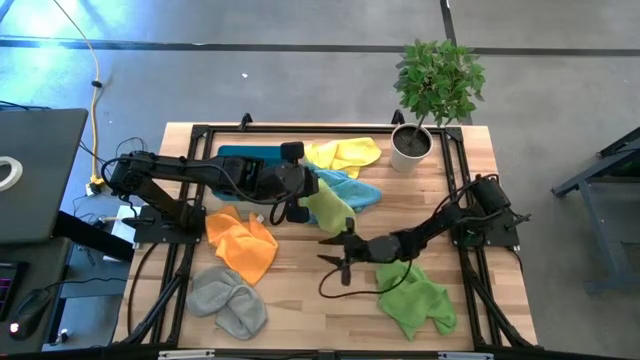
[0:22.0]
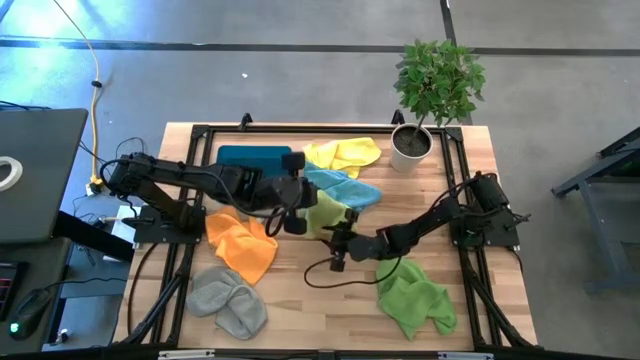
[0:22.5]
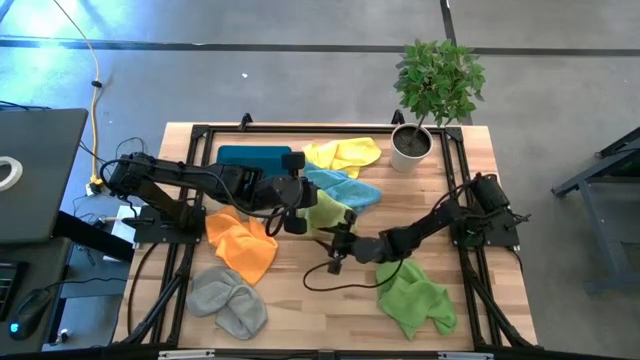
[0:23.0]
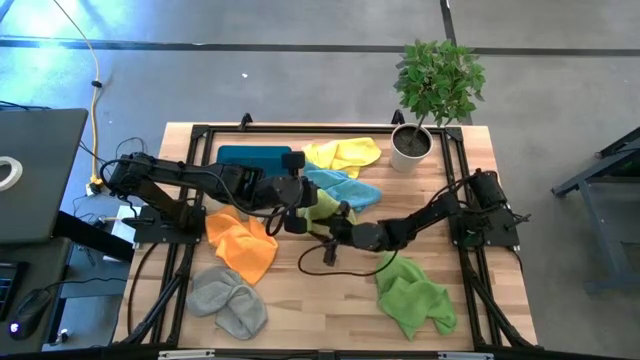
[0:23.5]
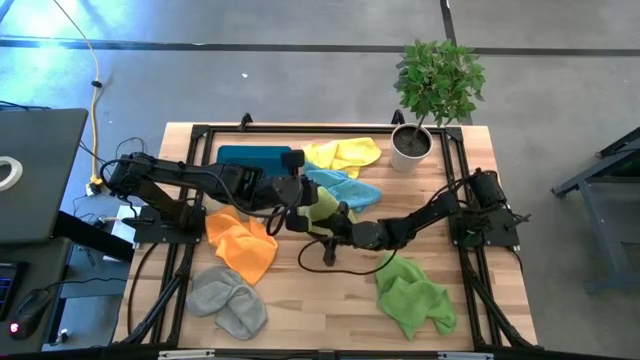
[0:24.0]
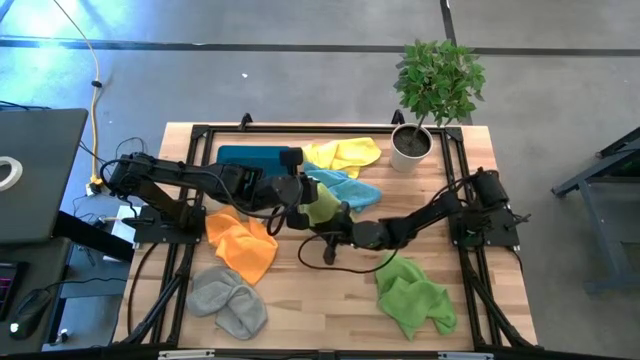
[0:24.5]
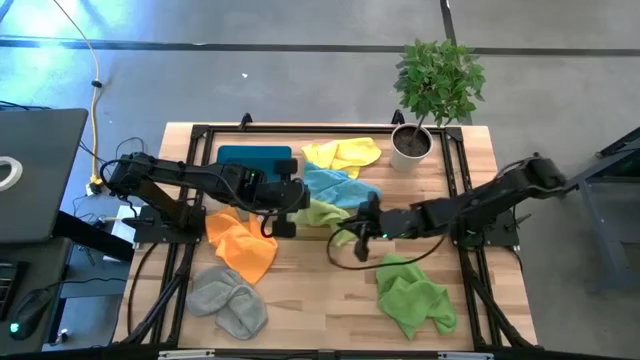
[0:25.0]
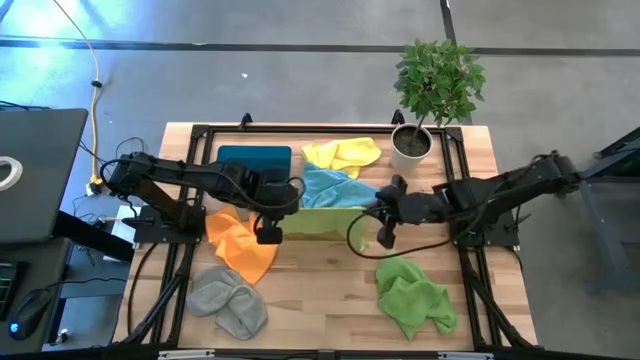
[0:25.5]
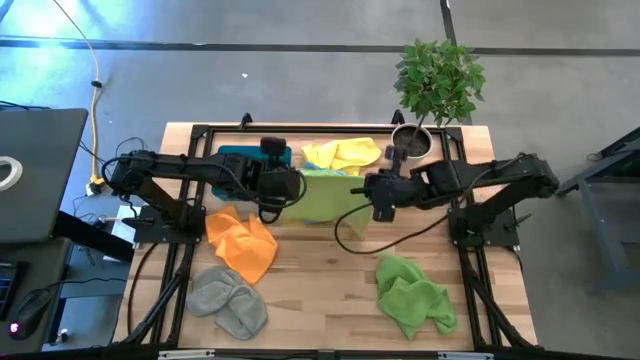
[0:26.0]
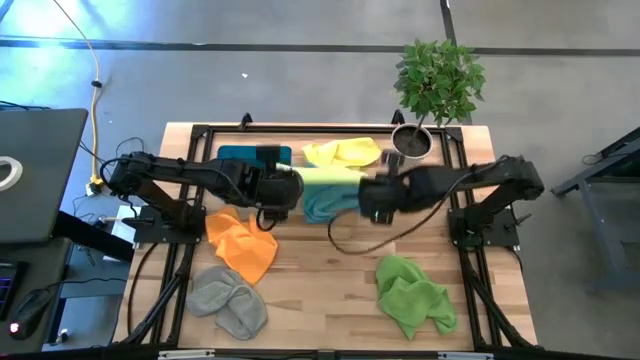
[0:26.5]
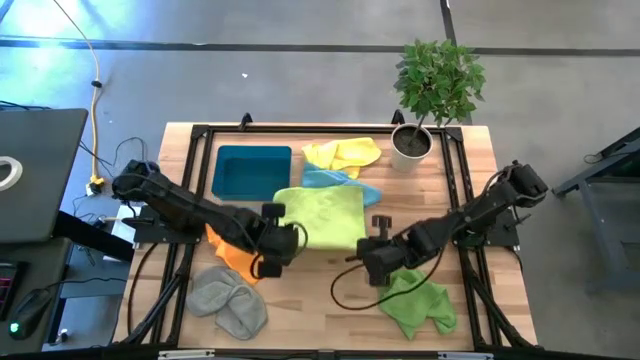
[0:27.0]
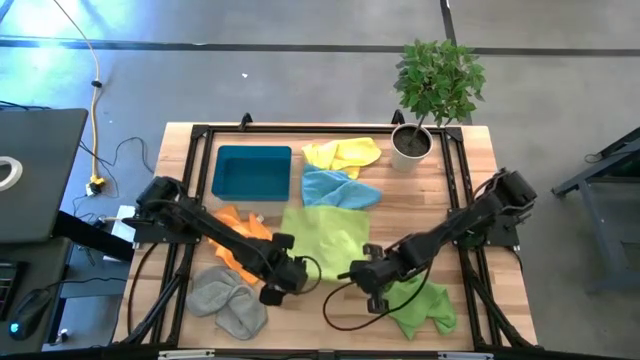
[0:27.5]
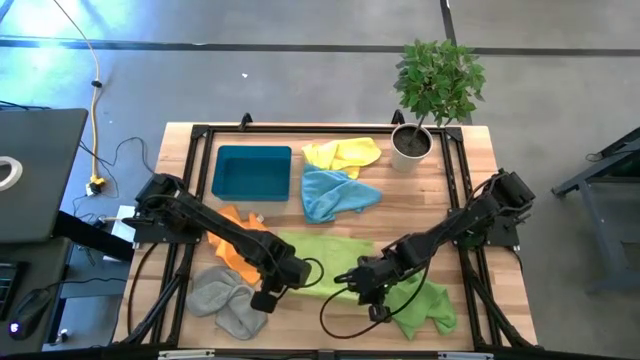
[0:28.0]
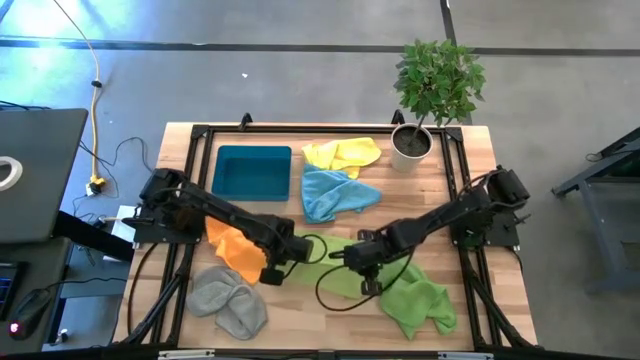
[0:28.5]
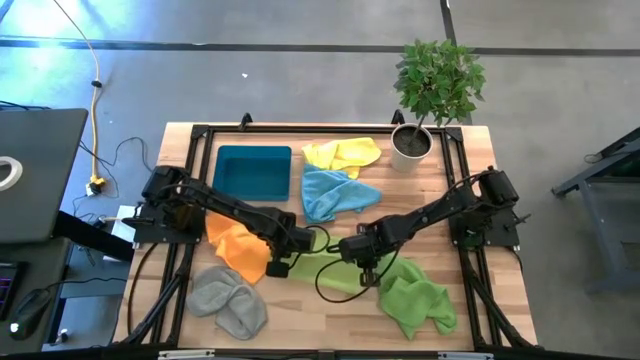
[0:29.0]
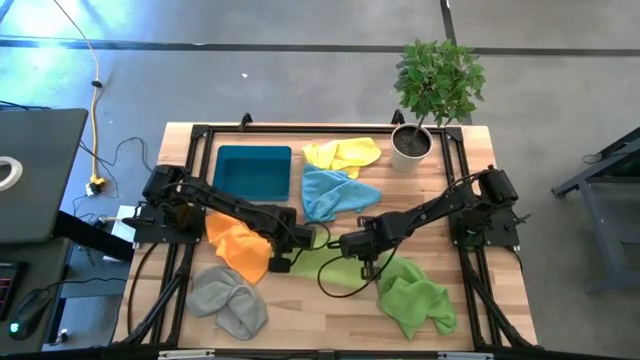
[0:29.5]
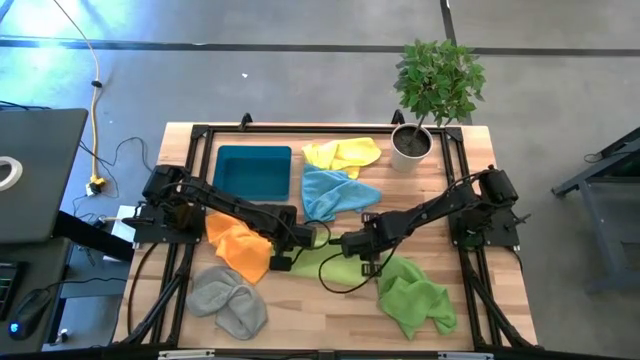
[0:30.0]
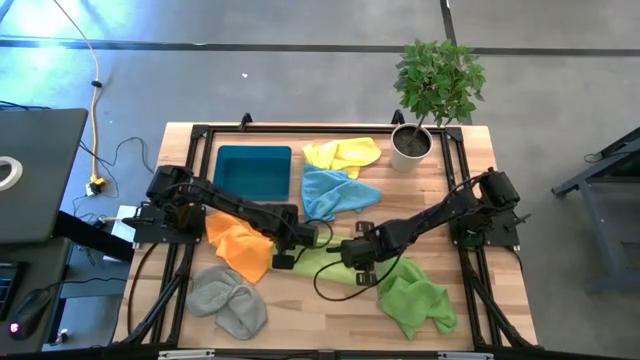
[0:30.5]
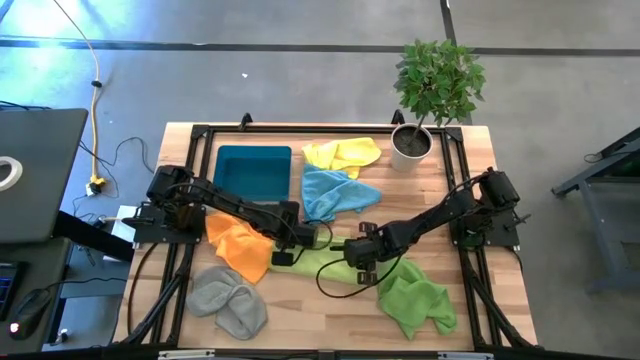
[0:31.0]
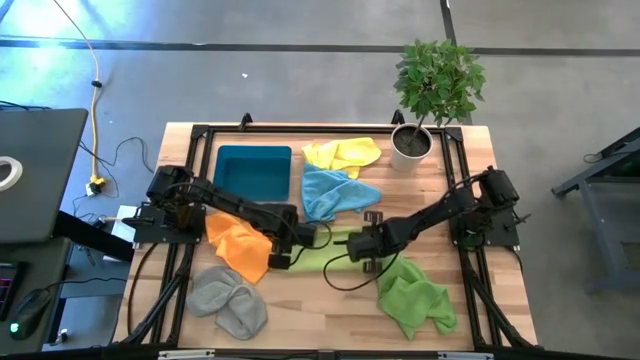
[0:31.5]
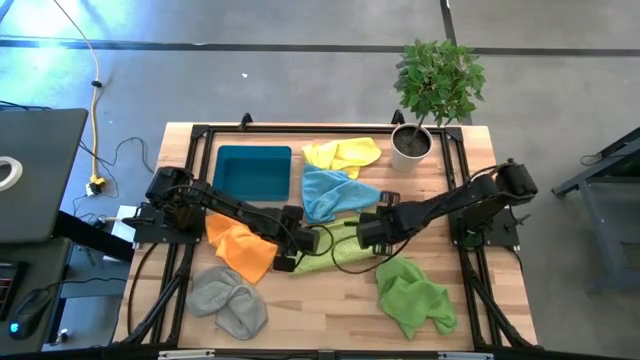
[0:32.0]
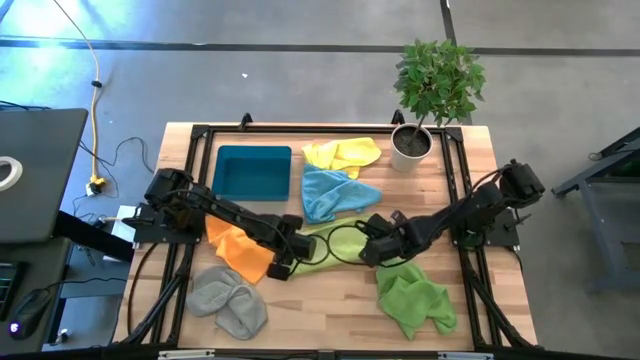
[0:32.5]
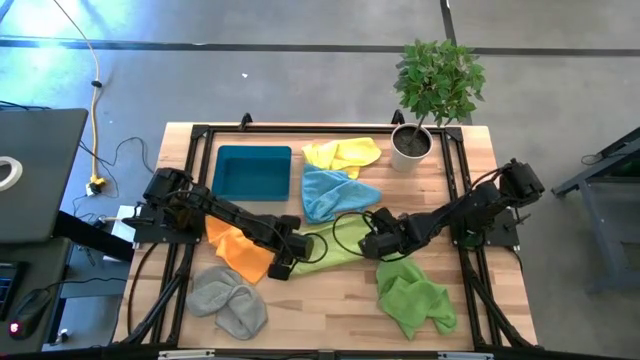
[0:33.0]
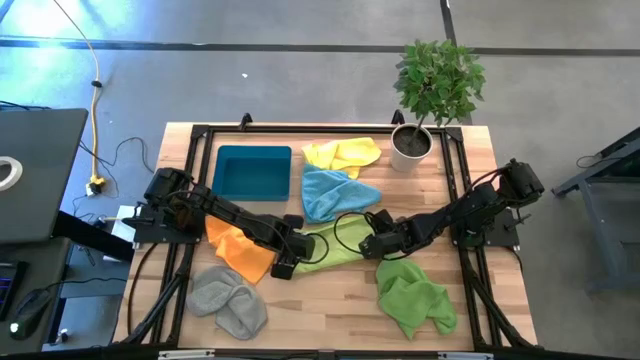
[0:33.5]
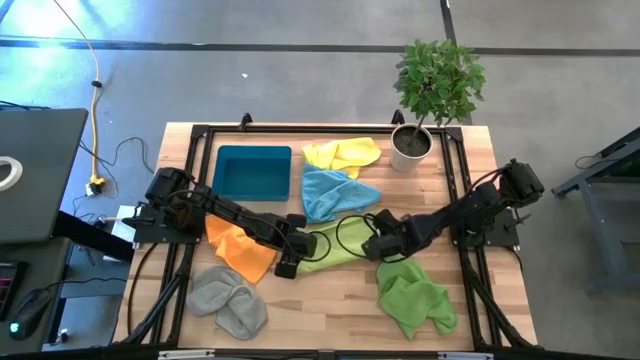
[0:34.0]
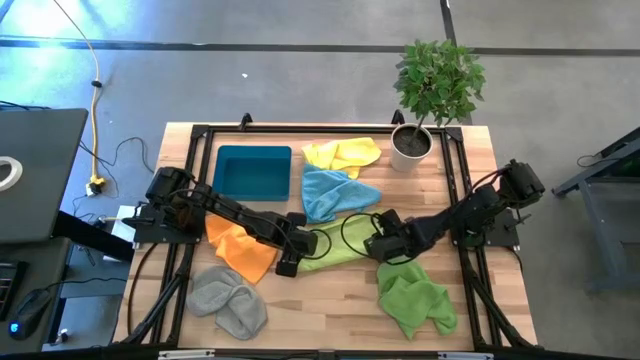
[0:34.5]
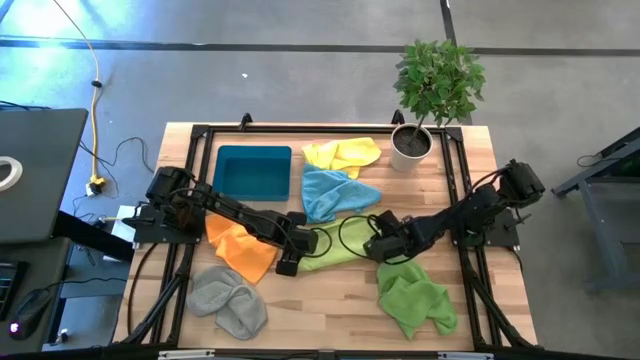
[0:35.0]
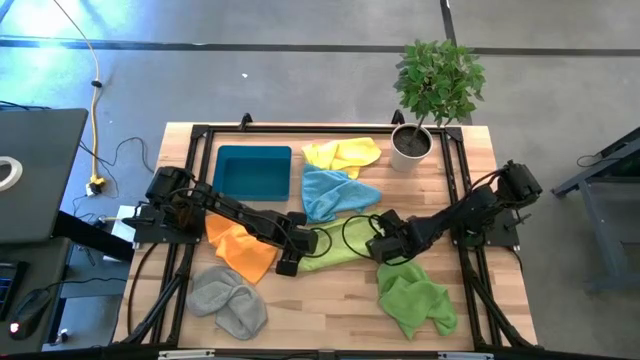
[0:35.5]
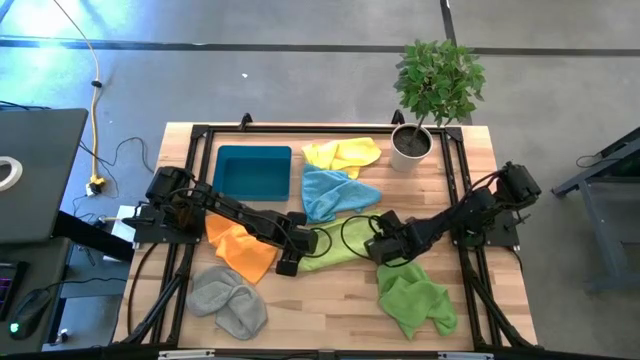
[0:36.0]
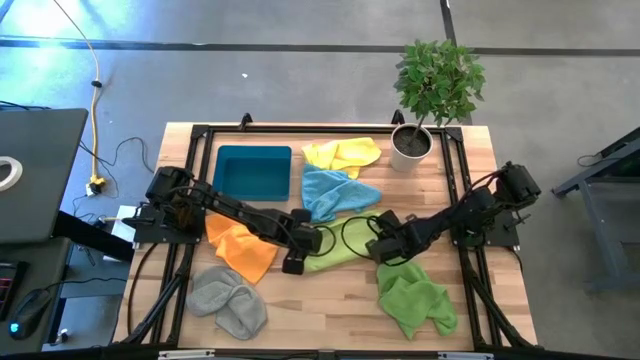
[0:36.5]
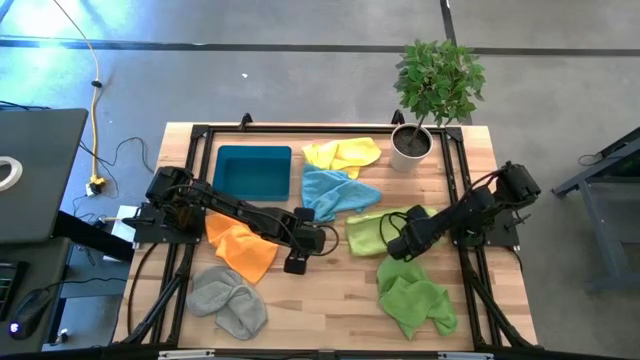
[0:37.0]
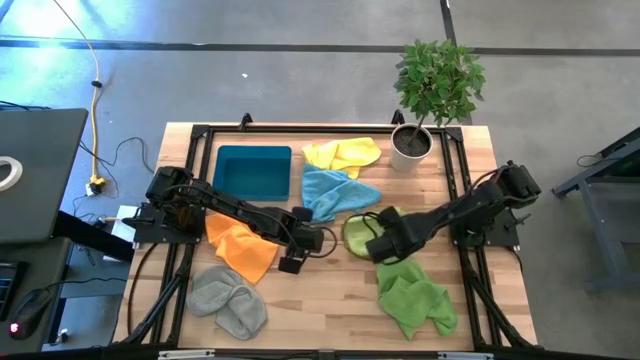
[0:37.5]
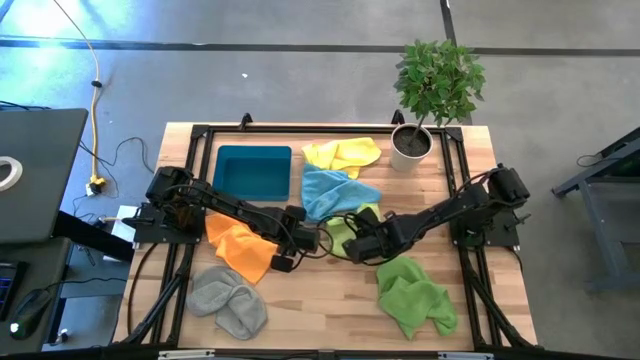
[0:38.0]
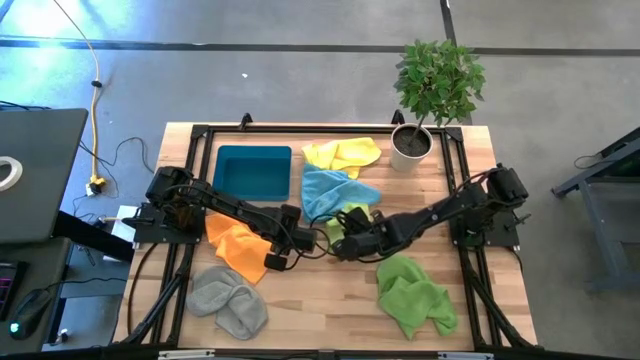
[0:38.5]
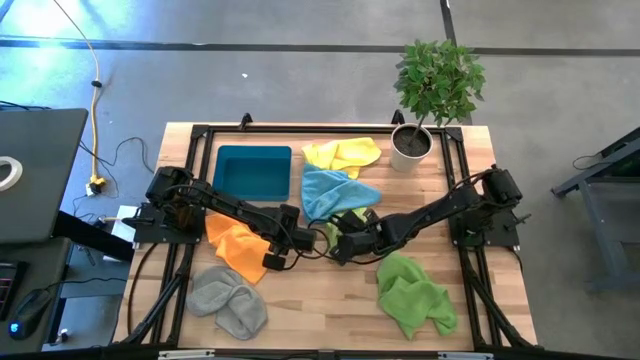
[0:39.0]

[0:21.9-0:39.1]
Task: Fold microfiber towels
Fold the light green microfiber cloth

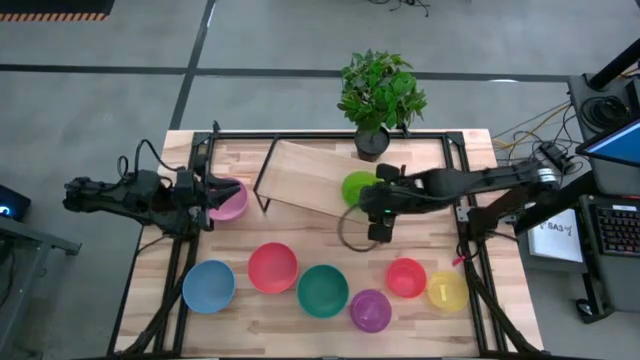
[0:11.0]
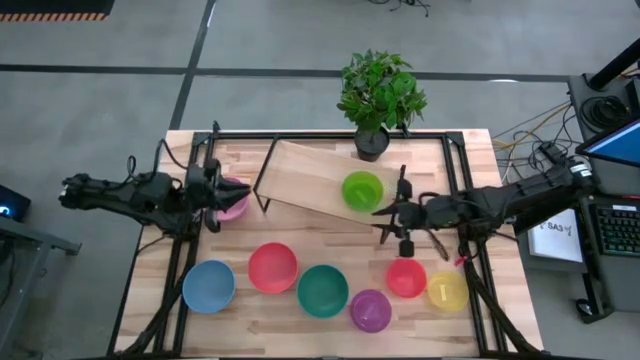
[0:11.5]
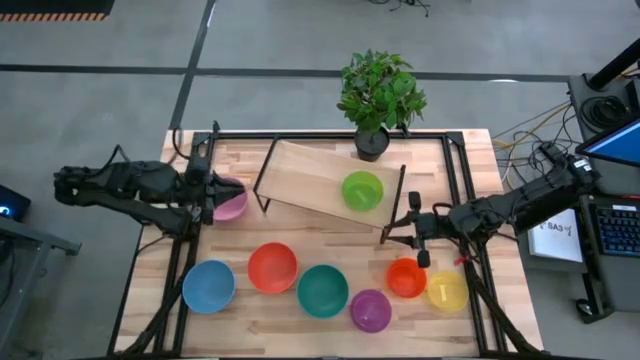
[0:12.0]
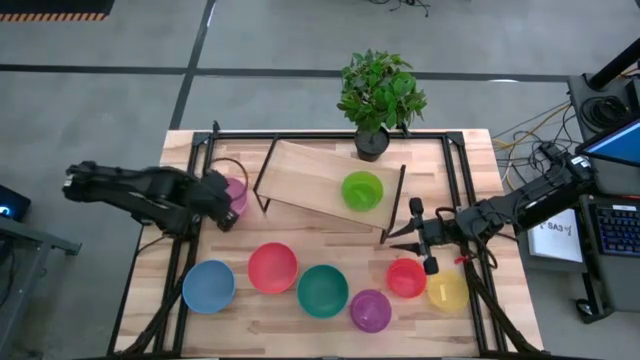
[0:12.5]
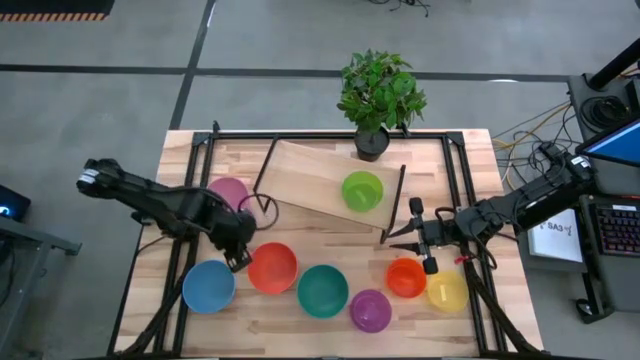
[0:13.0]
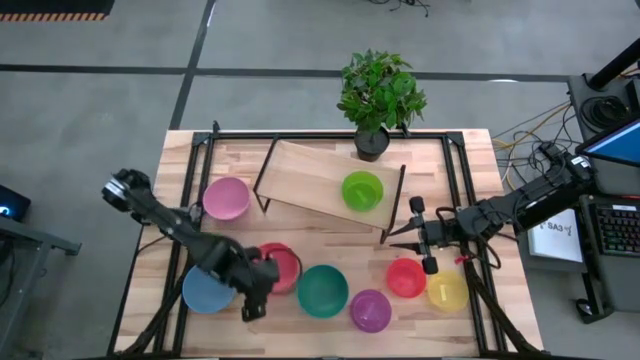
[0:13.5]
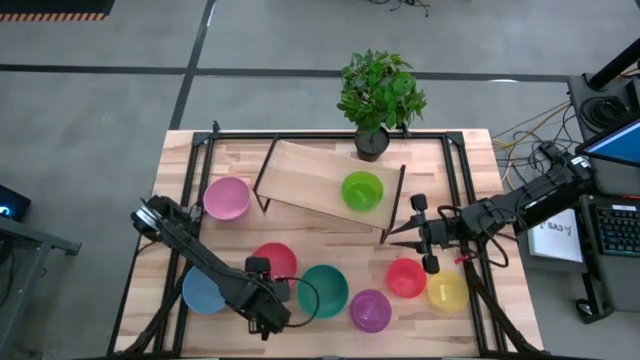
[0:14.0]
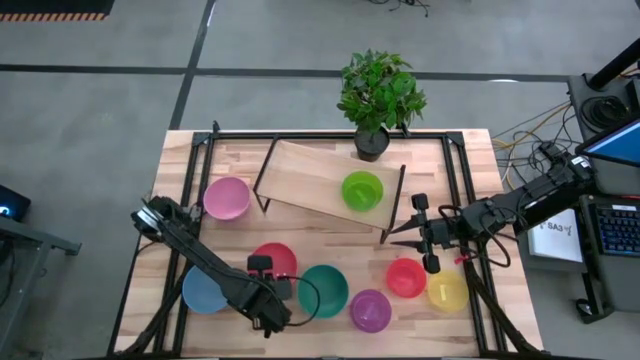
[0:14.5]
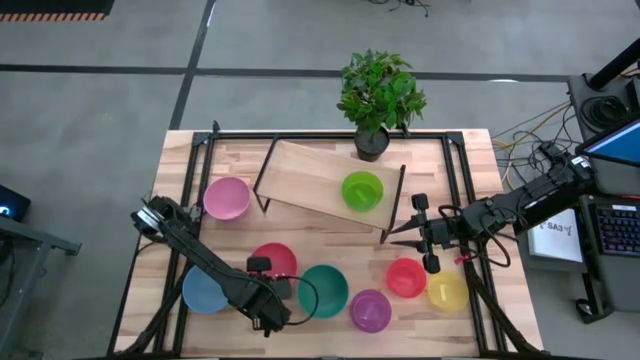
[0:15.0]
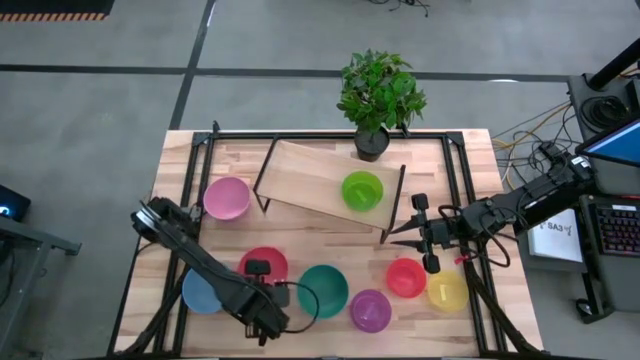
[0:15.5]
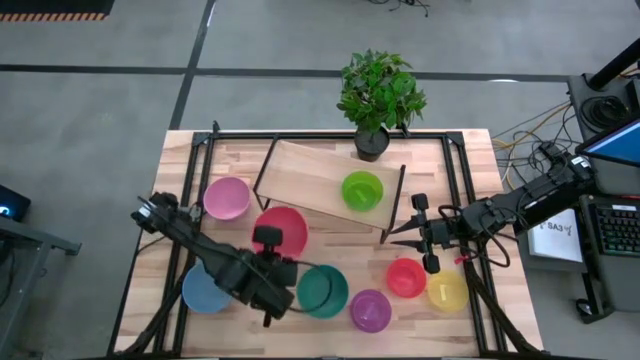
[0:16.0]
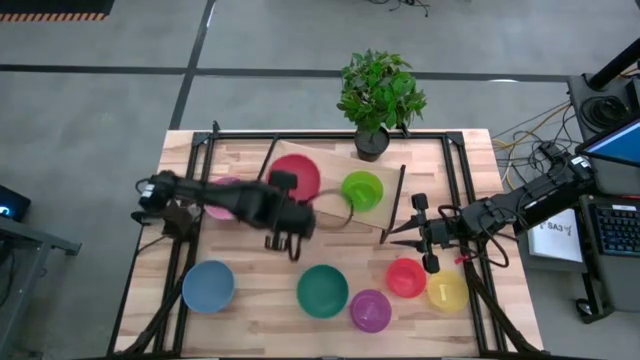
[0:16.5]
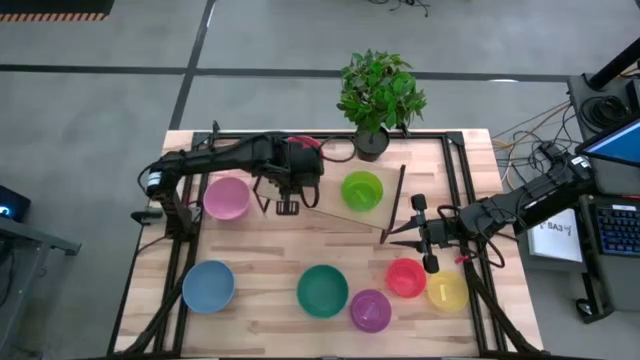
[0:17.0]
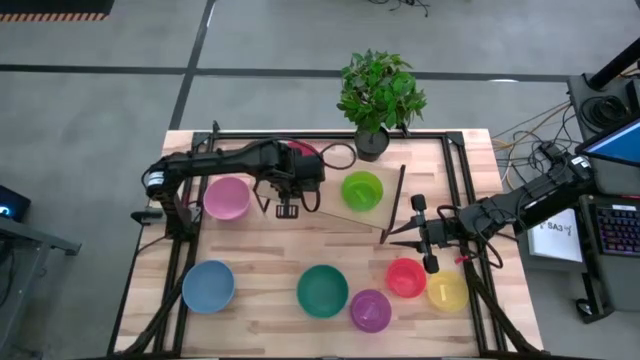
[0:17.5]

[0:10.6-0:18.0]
Task: Place and stack bowls onto a shelf
Put the orange bowl on the shelf
